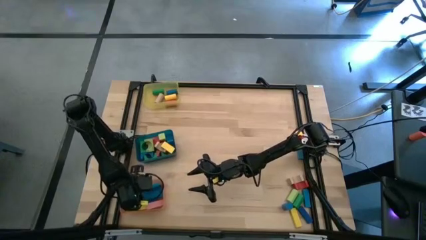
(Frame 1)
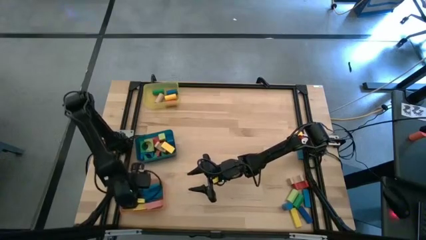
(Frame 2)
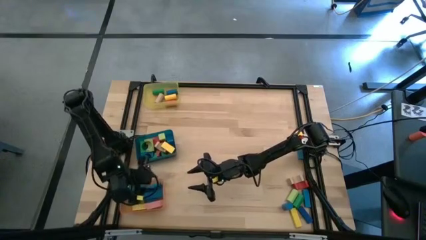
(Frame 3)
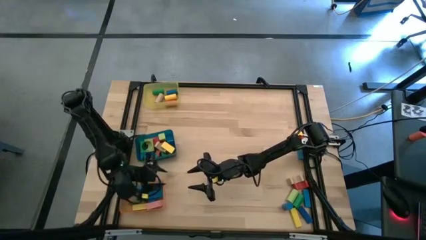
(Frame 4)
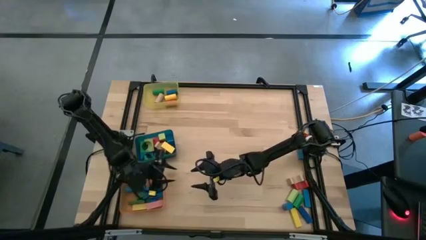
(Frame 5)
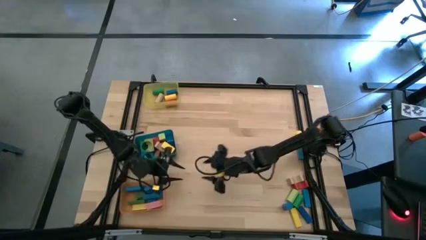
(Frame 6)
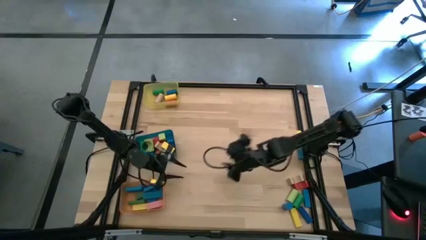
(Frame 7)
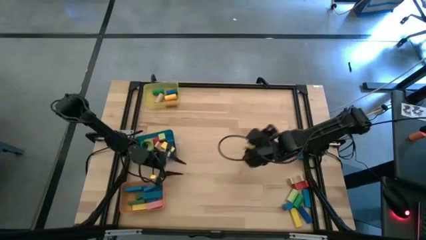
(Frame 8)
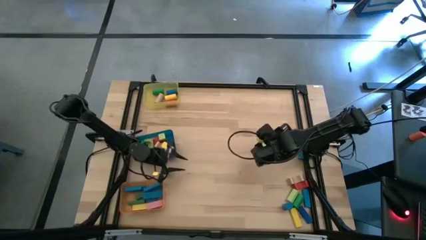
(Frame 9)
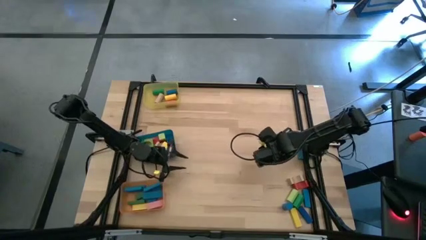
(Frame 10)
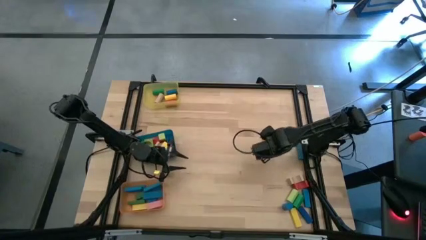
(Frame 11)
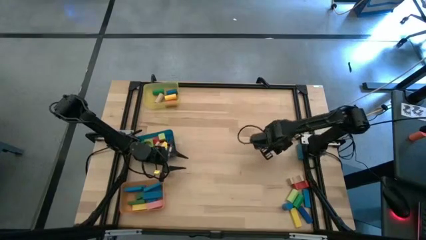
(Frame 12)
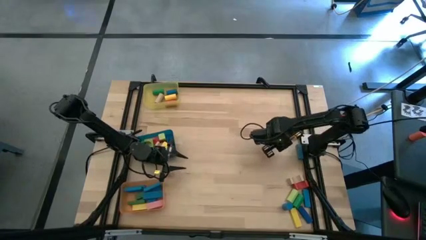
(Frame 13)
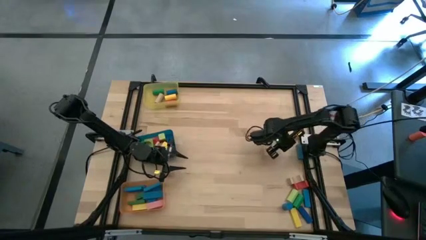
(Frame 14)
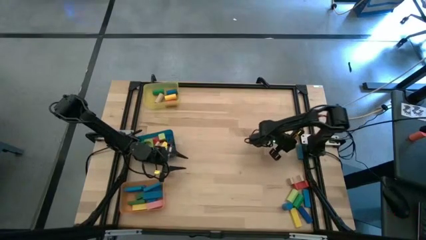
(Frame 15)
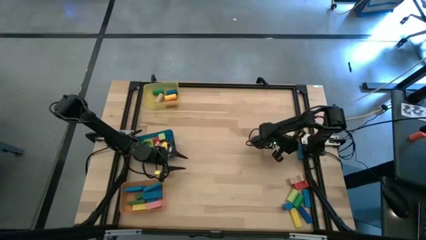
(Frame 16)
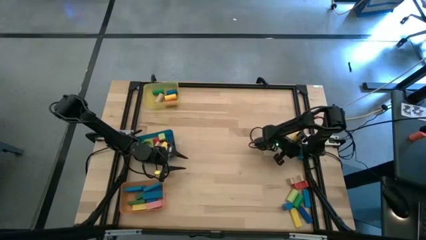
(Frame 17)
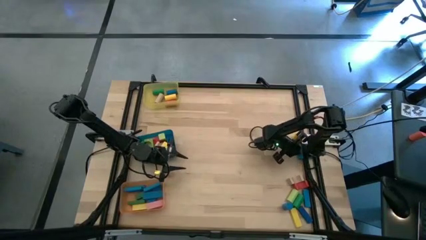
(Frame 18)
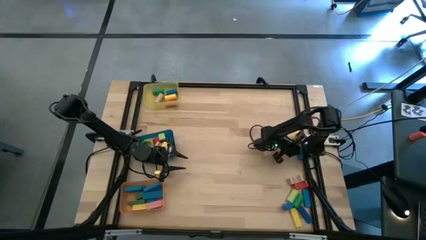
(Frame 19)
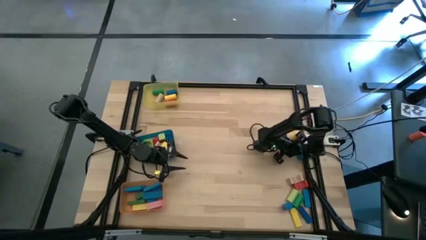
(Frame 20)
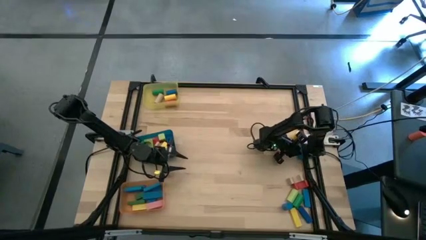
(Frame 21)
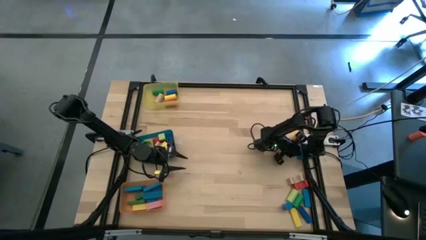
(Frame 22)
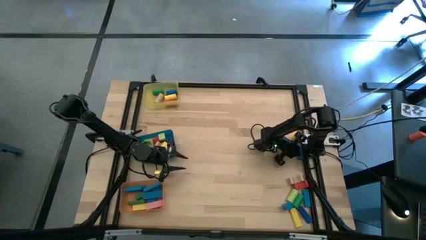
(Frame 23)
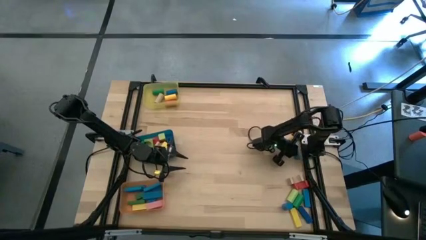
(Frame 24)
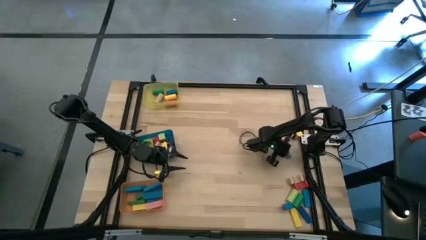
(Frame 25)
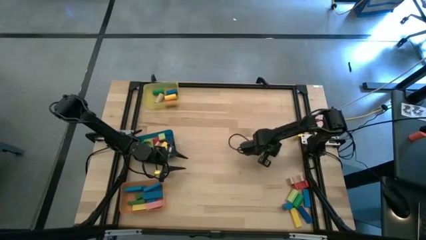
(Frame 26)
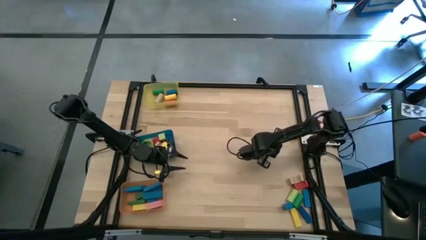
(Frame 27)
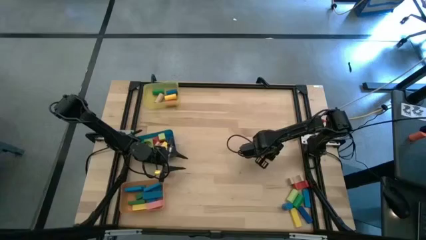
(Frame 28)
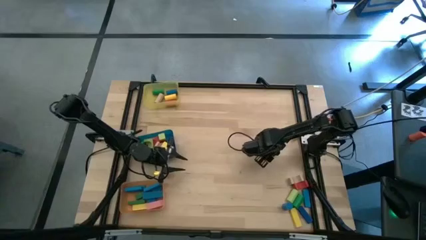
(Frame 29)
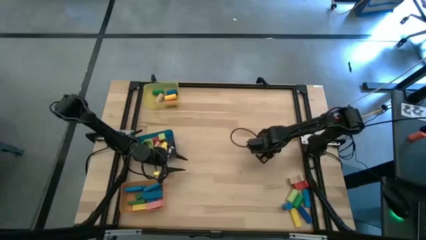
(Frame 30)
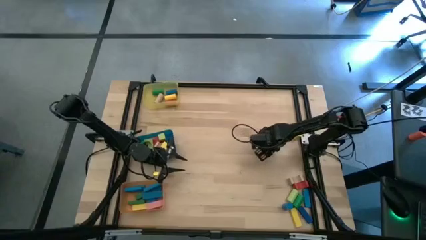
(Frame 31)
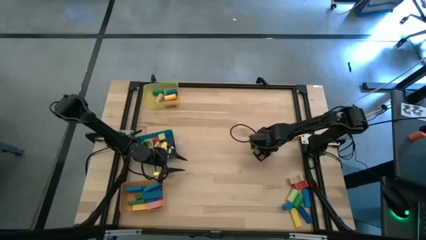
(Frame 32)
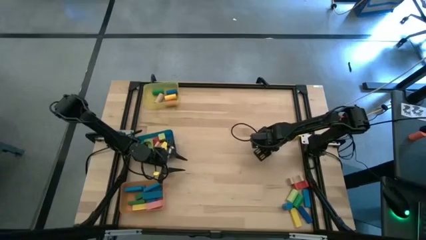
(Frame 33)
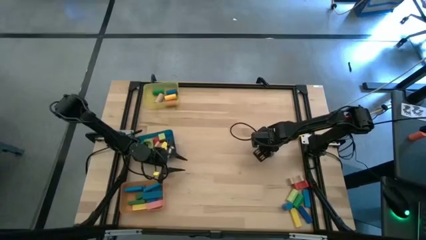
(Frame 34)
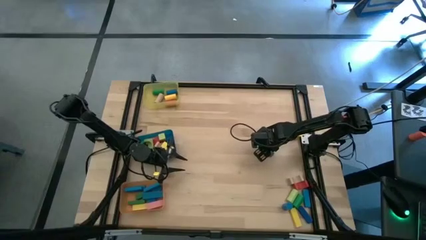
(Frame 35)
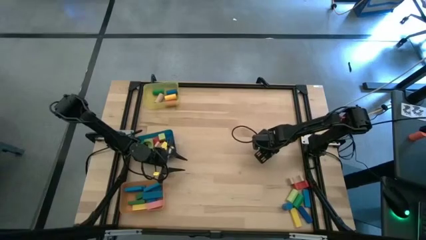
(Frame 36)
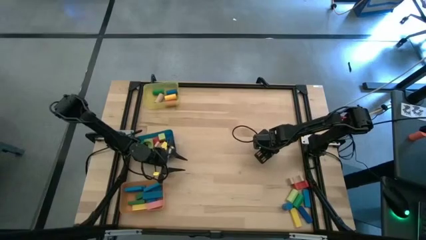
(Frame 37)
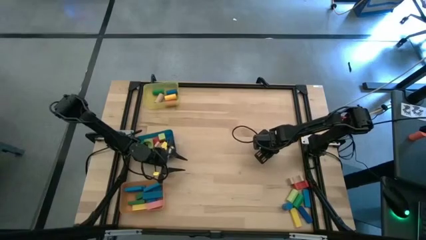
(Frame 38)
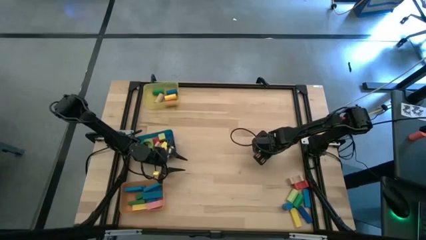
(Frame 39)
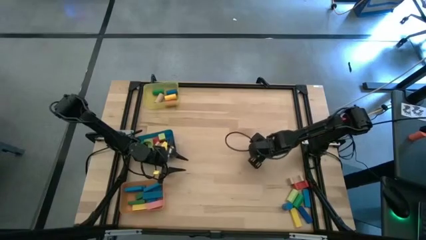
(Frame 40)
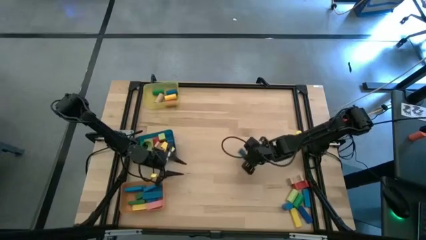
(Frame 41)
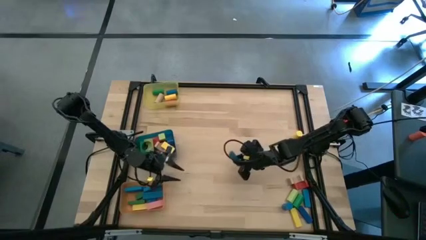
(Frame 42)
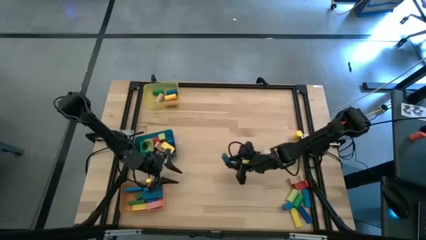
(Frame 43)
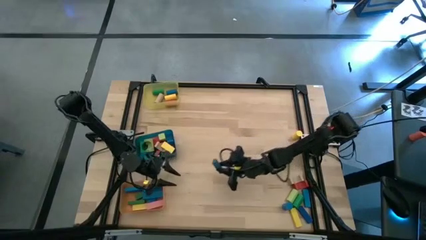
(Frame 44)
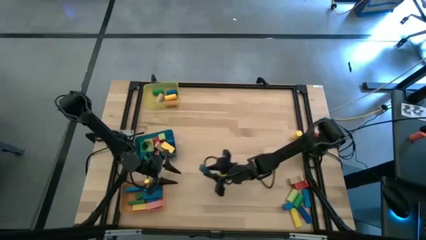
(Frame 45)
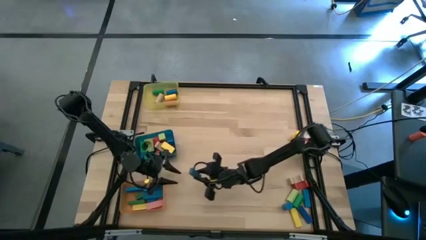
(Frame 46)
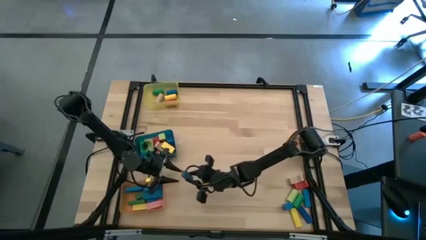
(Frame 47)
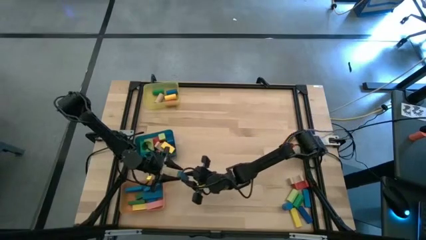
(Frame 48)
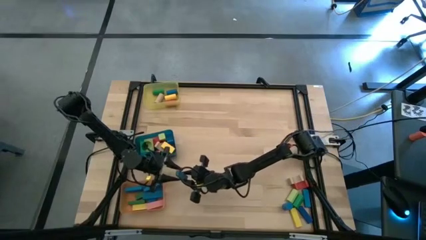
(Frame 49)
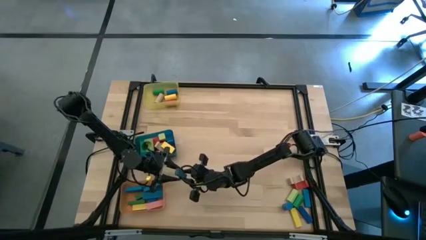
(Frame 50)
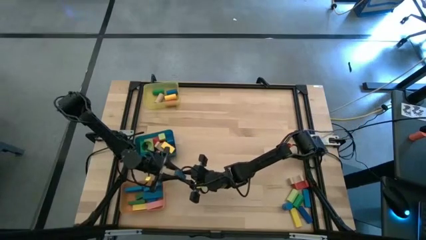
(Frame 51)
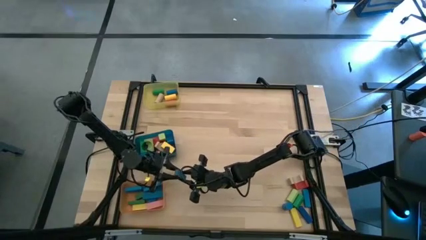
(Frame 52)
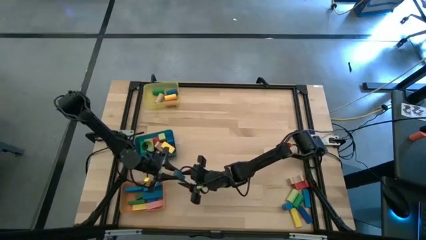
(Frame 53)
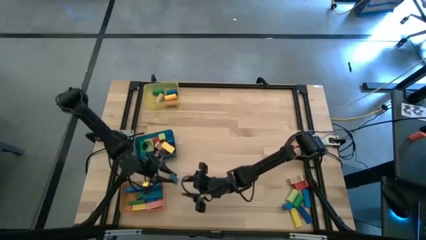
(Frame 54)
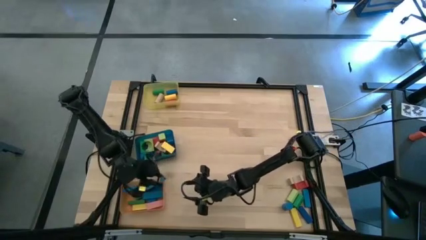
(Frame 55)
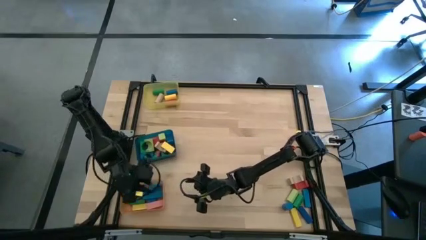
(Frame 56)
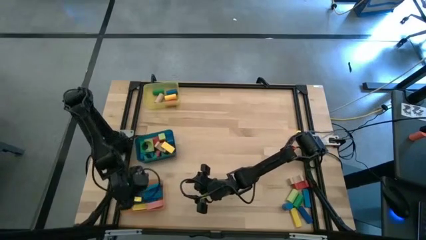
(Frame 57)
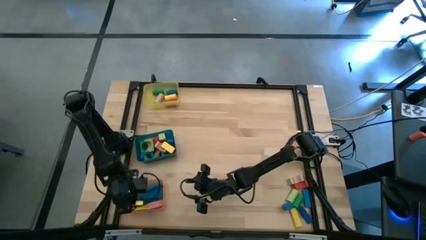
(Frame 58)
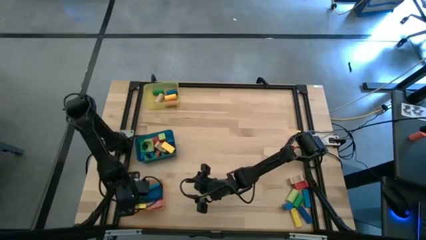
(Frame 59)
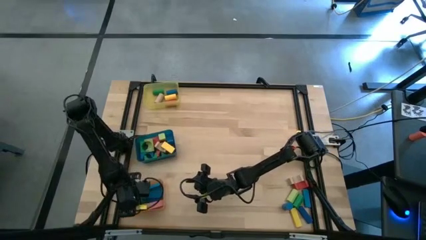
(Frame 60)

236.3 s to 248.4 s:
Task: Sort blocks by size
Put the blue block into the orange bin

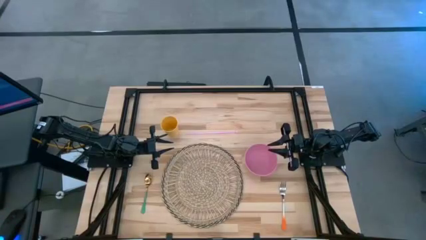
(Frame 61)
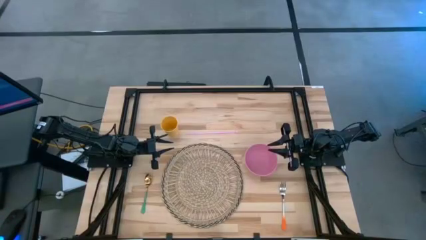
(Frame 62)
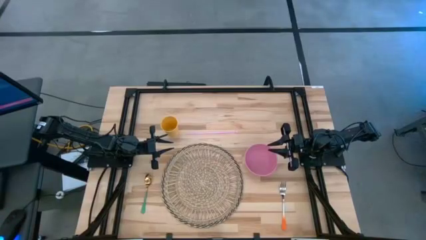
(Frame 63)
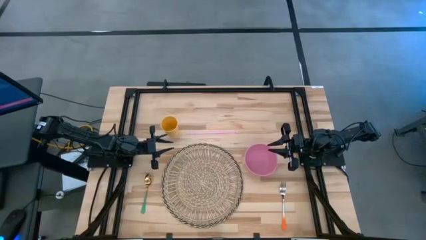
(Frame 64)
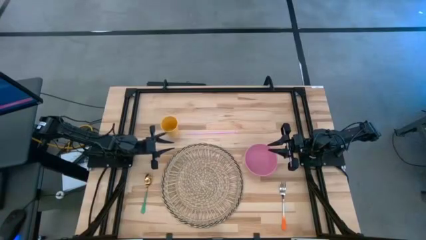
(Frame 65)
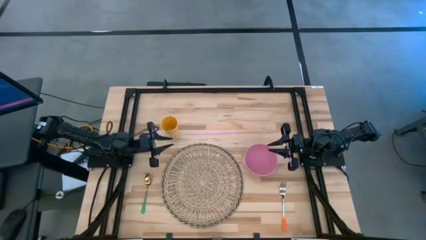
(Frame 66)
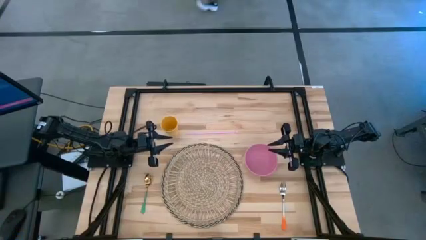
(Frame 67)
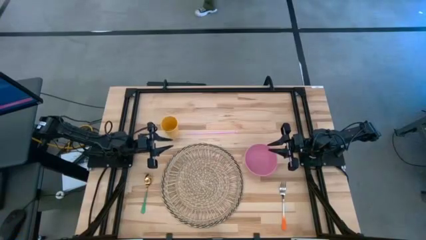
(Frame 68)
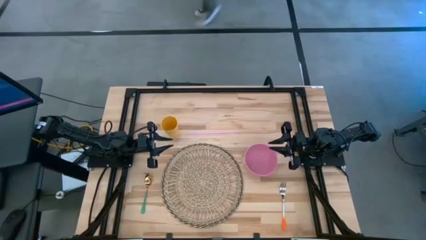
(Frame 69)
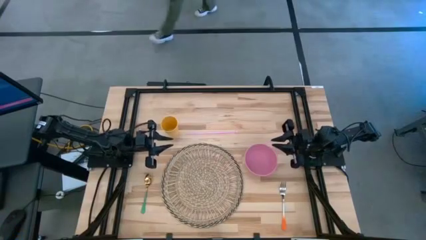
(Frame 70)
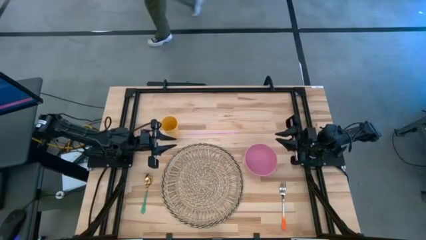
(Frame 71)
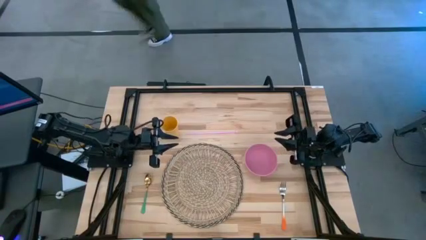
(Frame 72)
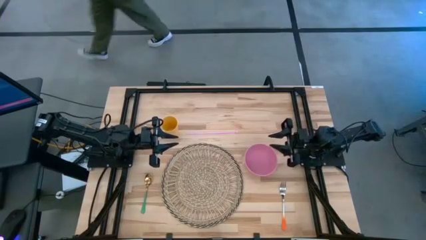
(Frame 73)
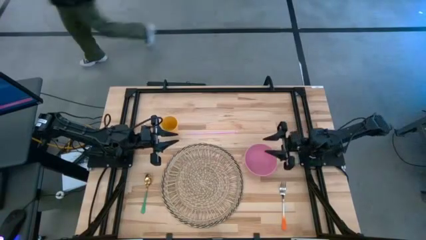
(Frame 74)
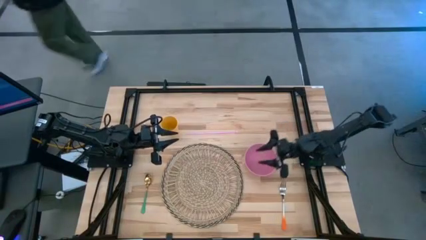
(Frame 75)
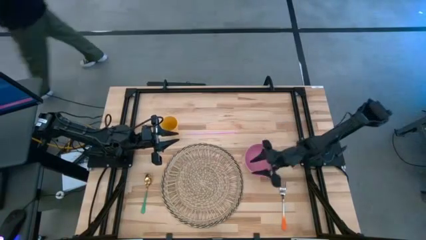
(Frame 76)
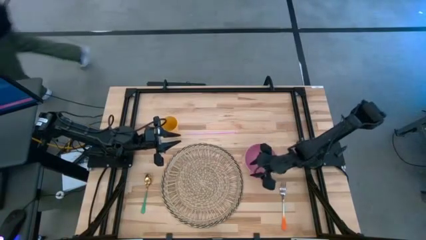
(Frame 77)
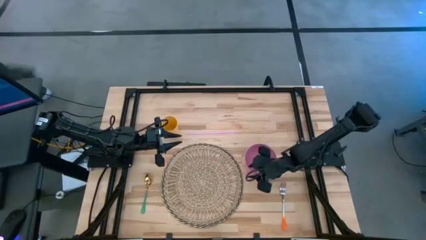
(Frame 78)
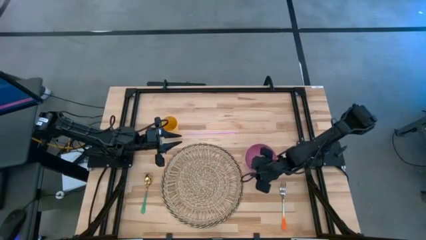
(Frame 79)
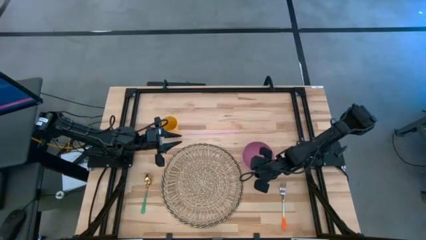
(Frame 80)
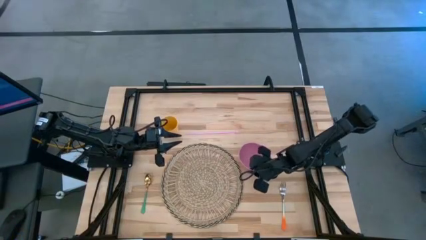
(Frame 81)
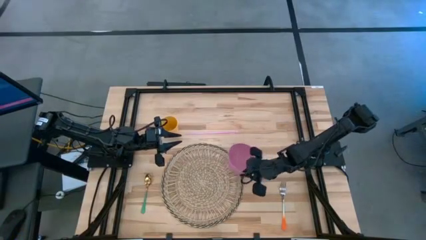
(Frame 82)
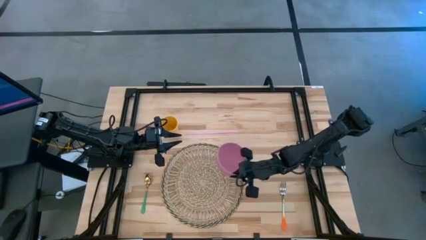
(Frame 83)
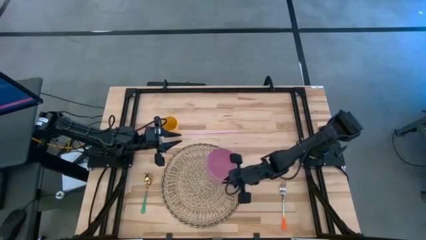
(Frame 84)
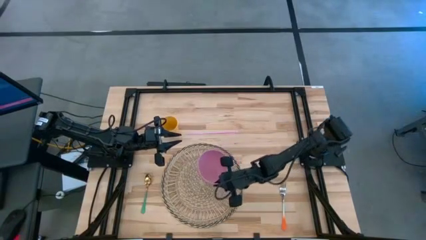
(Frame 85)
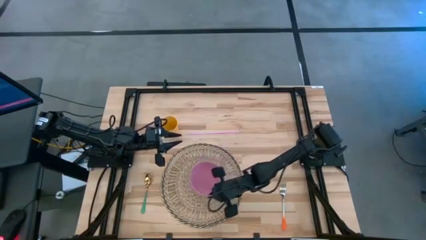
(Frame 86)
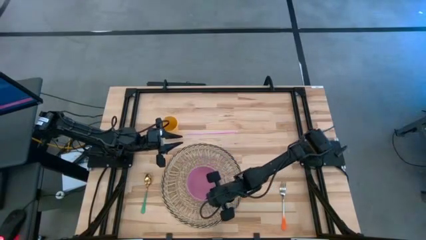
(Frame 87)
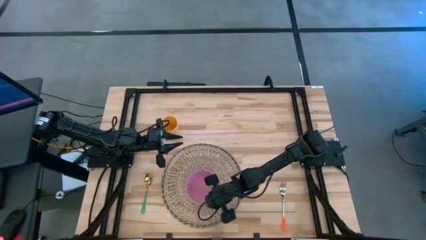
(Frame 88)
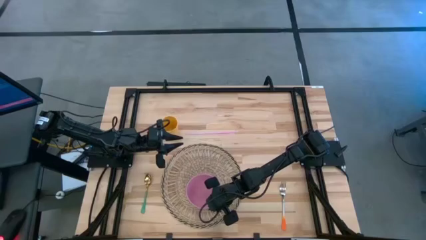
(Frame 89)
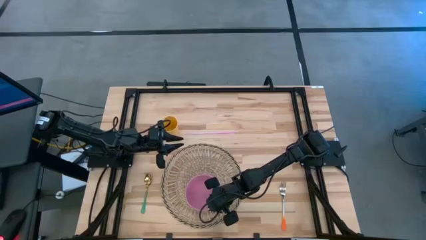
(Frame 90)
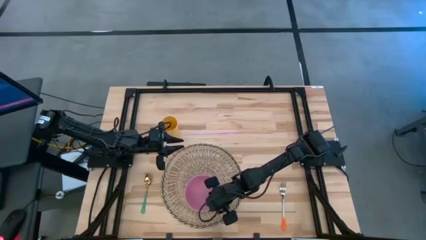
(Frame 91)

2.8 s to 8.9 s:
Task: Pick & Place Utensil
Put the pink bowl on the brown mat
